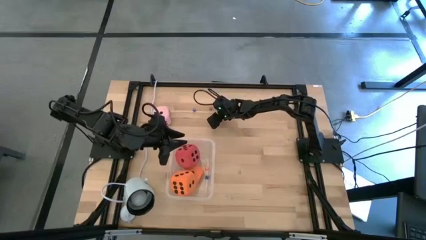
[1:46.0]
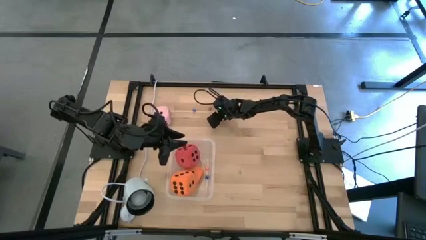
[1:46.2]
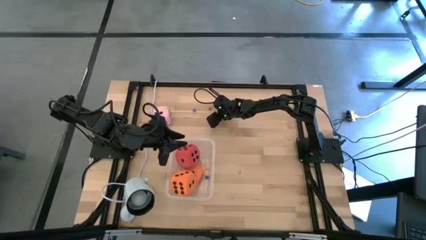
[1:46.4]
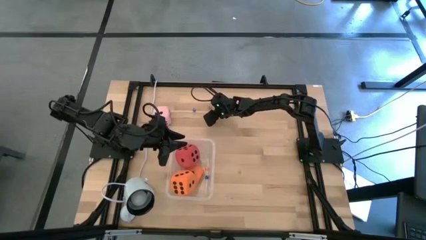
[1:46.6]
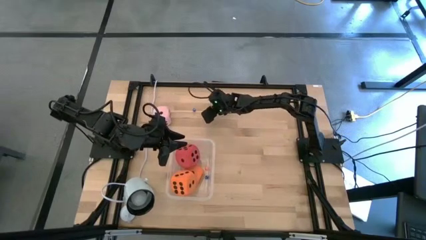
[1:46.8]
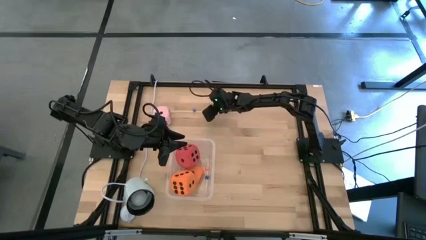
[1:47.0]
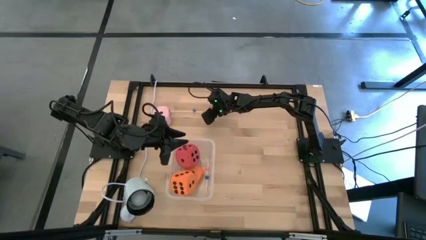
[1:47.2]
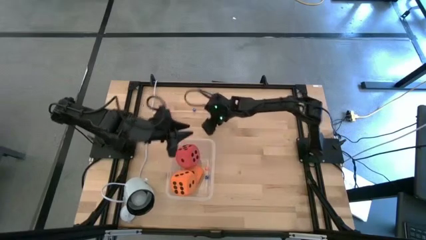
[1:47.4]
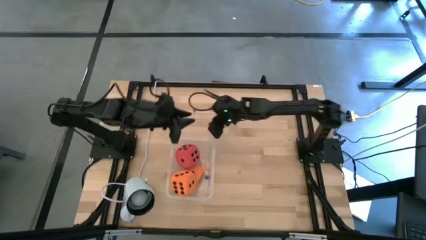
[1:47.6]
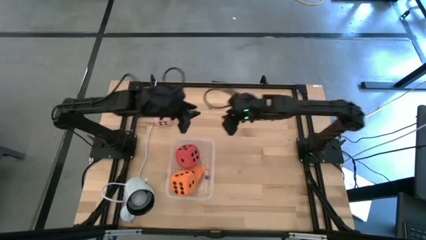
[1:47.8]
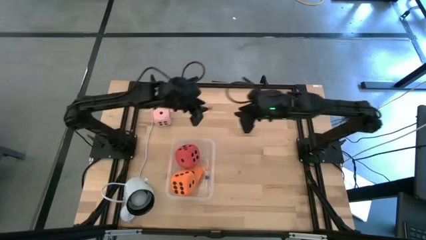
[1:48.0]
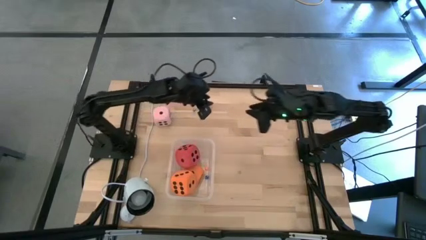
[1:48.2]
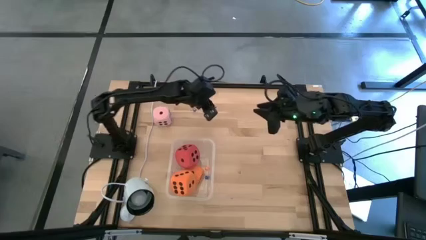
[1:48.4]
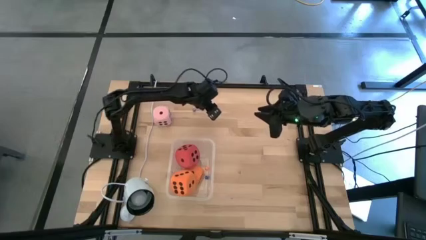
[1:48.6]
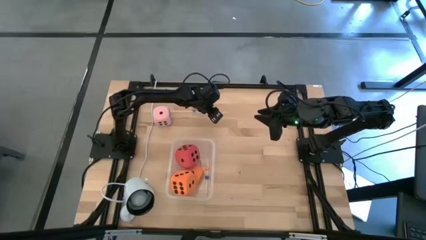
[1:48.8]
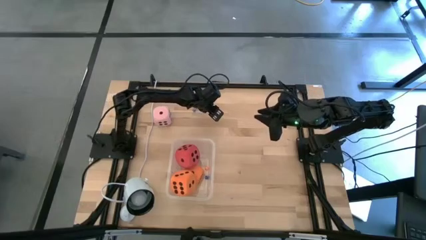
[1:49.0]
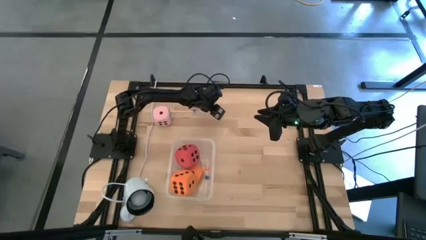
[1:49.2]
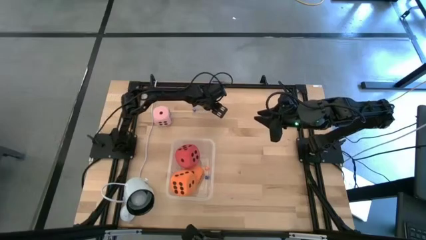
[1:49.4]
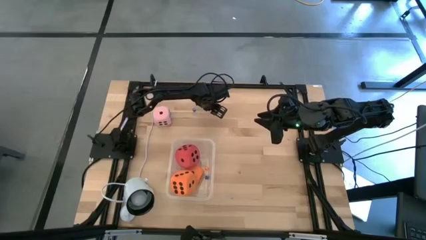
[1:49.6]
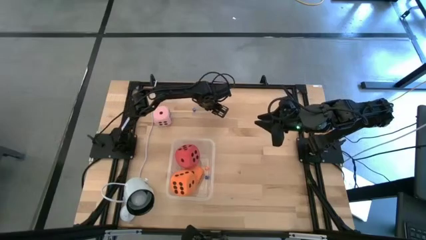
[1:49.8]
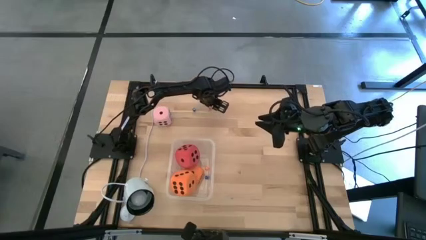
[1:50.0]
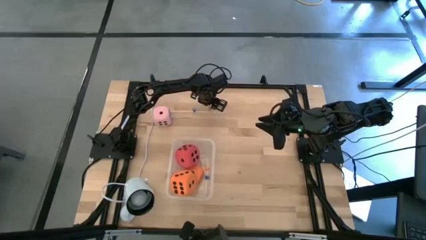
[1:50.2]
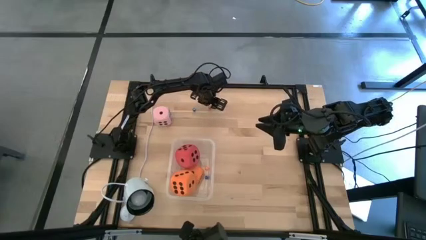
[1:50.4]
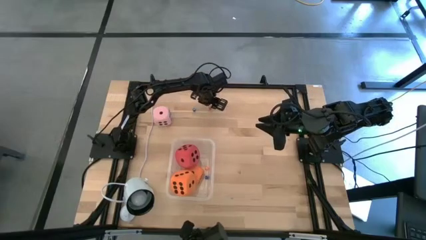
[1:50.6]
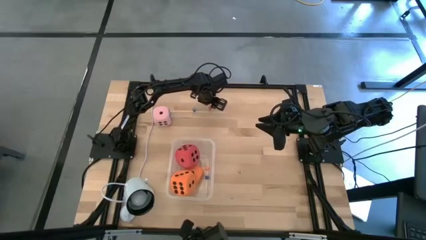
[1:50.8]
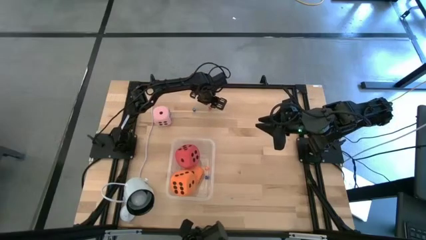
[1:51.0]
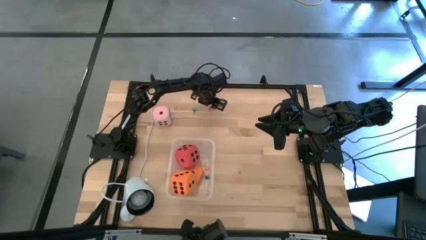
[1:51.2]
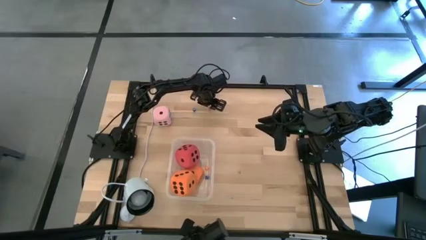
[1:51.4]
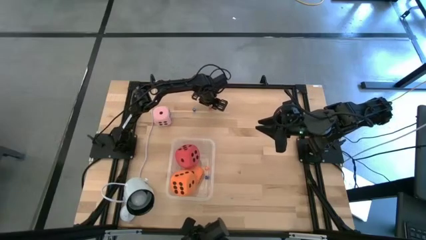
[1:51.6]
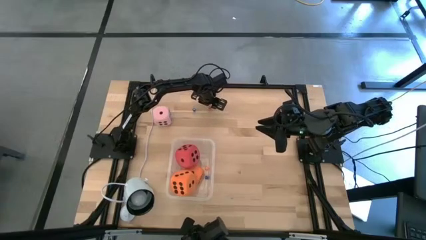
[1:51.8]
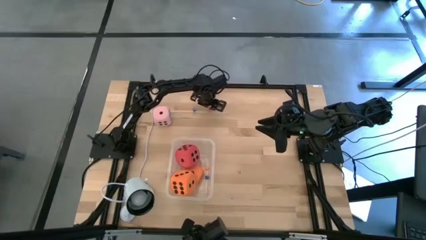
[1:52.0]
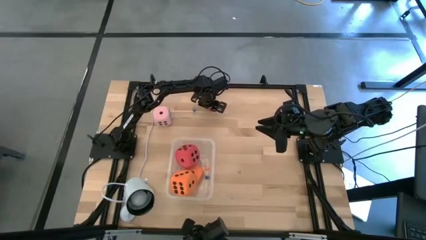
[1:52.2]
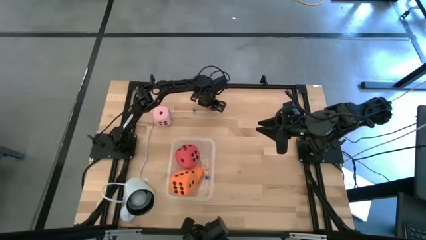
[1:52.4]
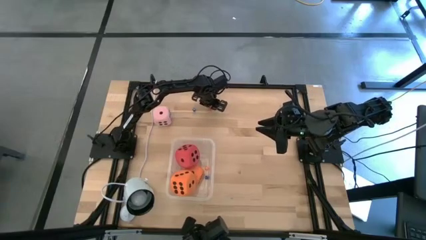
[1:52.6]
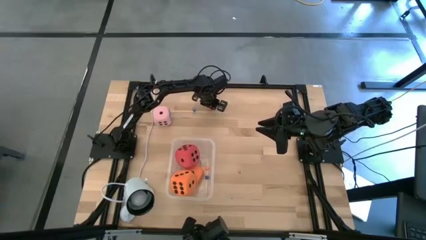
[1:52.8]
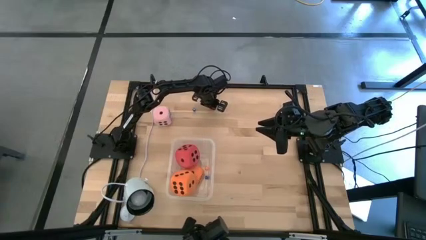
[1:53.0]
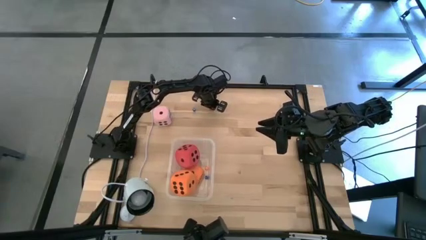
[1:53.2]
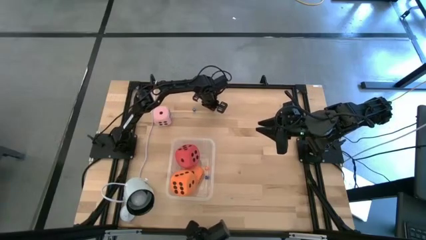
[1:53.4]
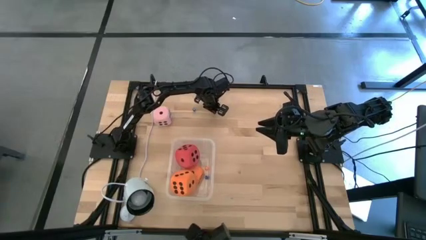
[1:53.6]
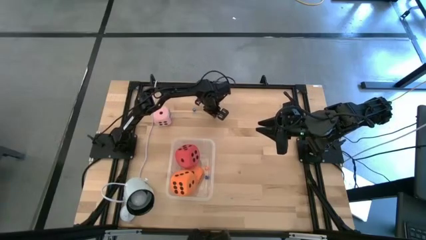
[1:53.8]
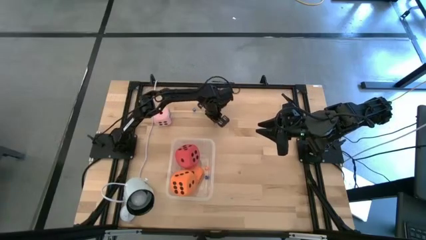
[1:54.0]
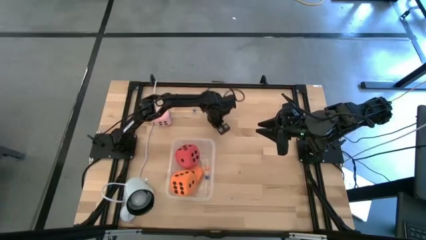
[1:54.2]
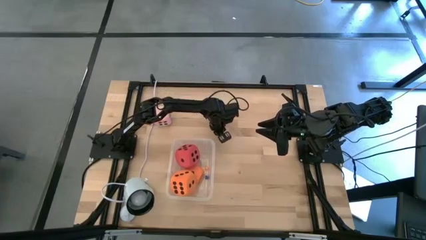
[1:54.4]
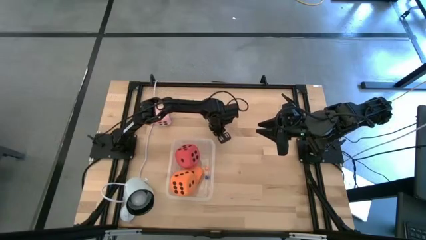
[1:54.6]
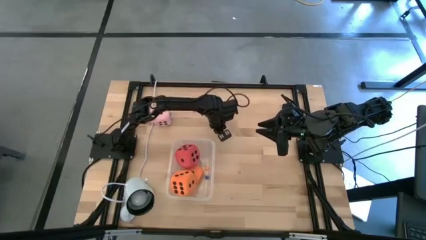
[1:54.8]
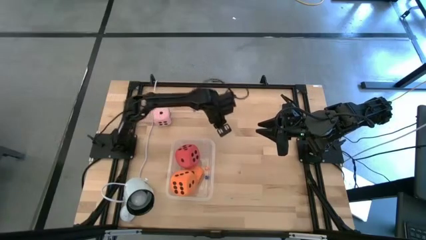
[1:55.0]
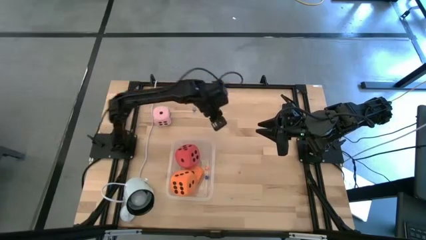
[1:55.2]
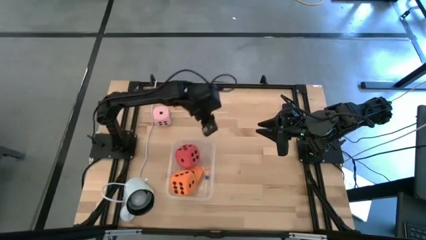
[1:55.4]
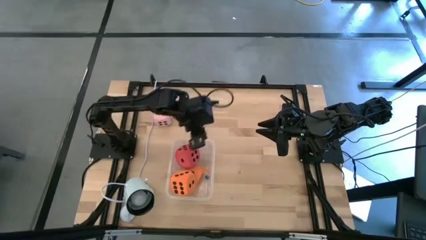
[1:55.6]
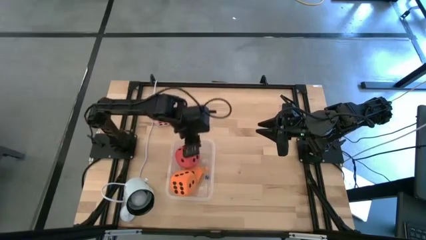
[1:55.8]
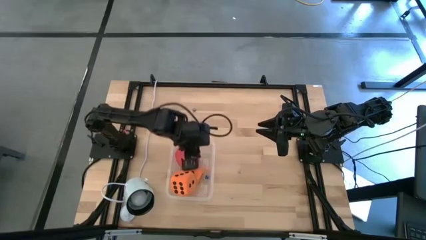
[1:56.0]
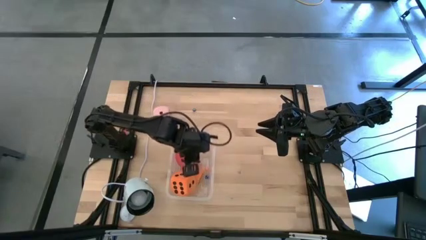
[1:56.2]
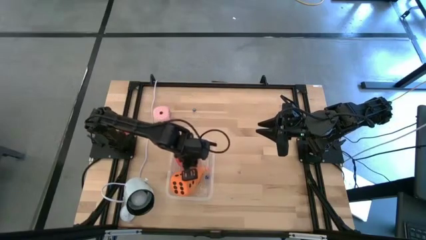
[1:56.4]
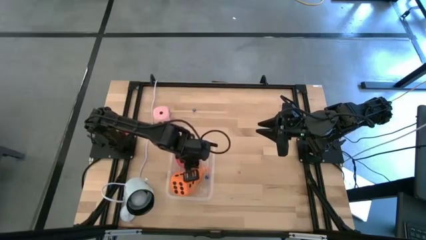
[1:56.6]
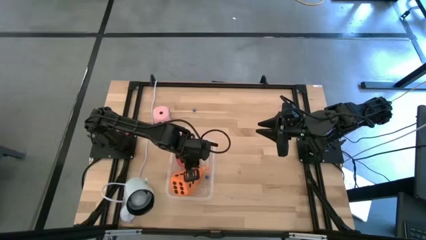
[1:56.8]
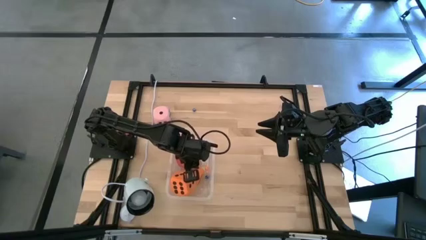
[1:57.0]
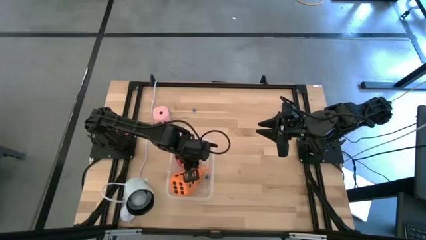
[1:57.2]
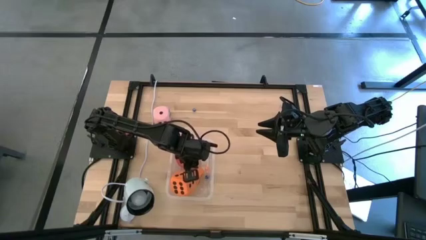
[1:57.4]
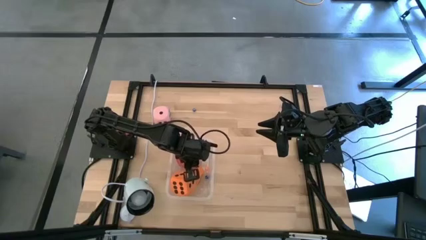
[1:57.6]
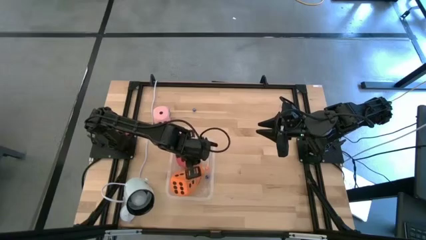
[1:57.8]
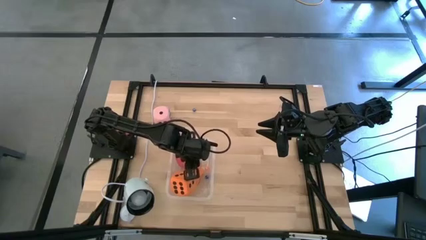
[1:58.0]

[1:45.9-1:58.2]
Task: Pick & Place Dice
Put the small red die on the bin

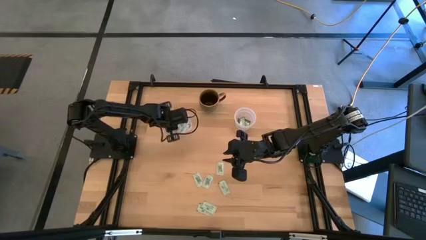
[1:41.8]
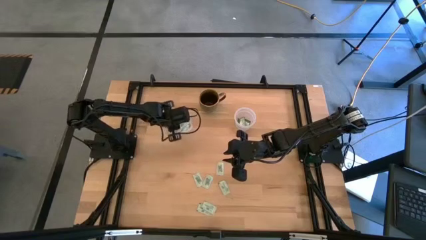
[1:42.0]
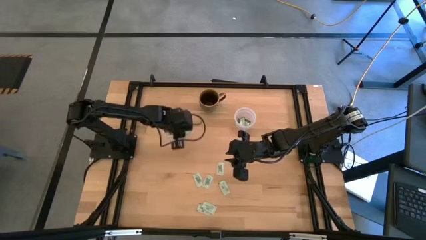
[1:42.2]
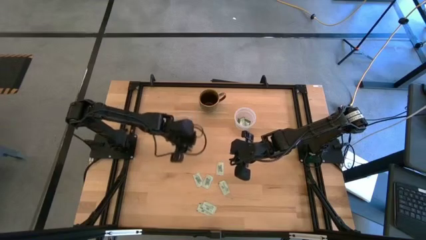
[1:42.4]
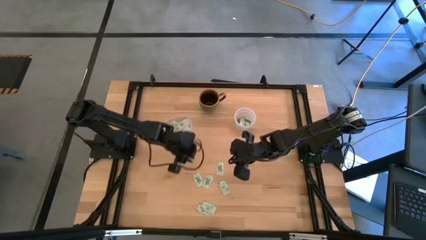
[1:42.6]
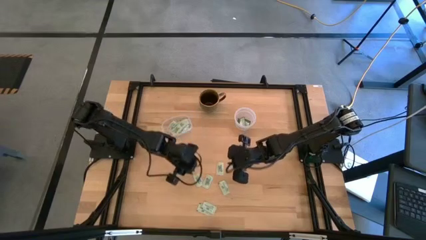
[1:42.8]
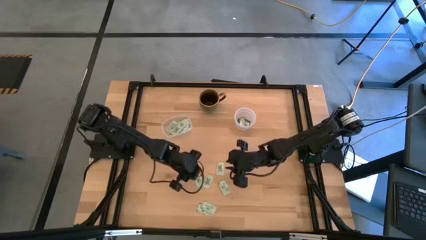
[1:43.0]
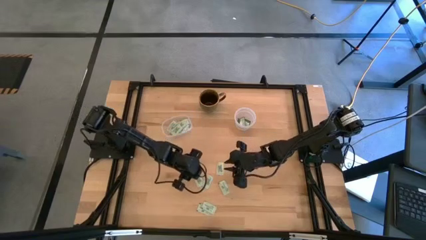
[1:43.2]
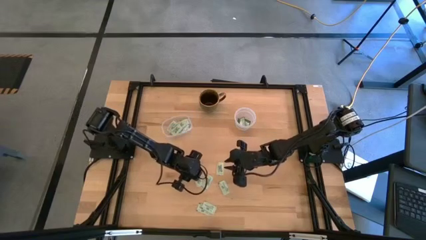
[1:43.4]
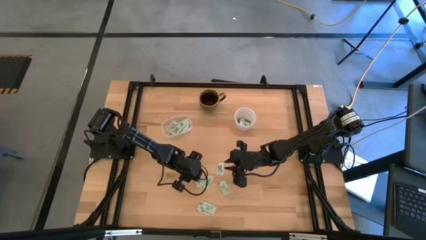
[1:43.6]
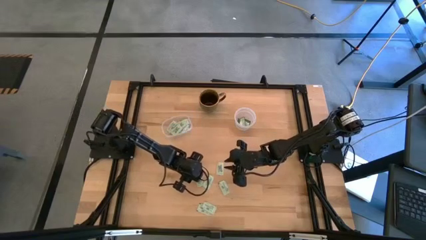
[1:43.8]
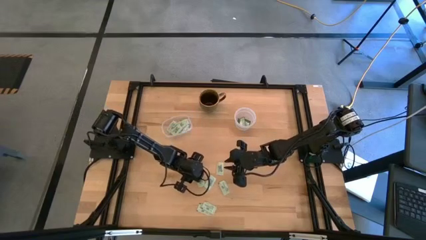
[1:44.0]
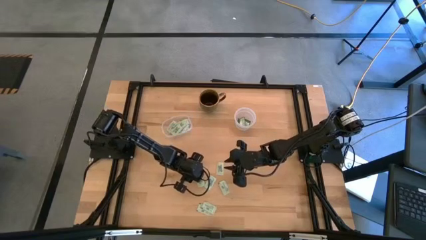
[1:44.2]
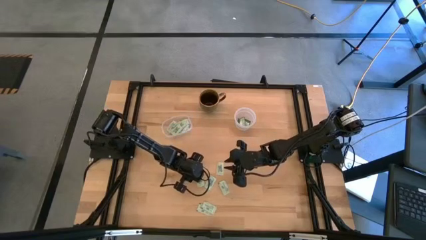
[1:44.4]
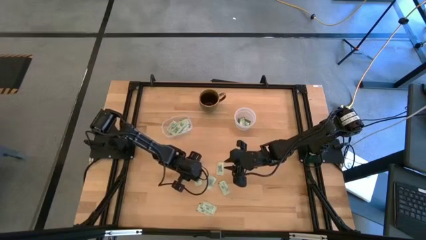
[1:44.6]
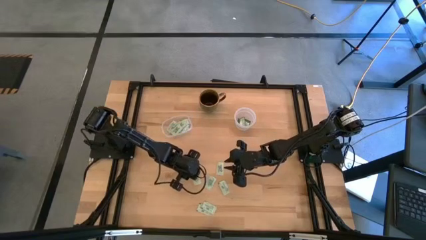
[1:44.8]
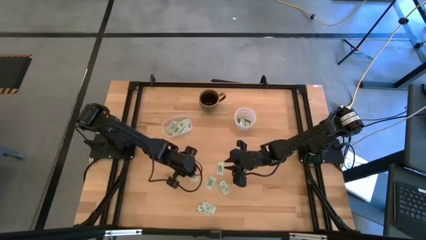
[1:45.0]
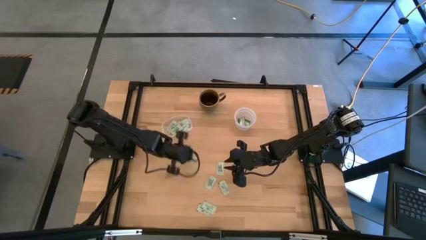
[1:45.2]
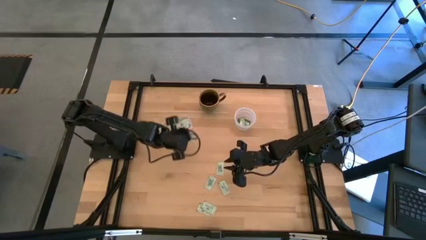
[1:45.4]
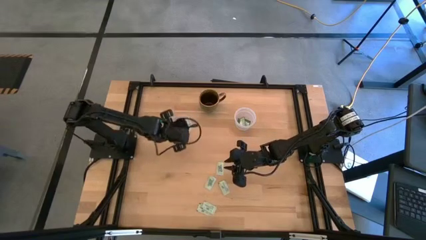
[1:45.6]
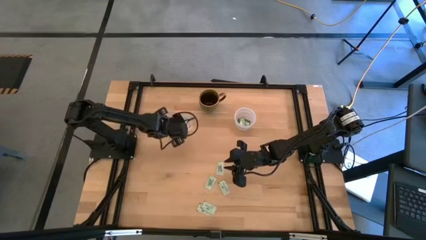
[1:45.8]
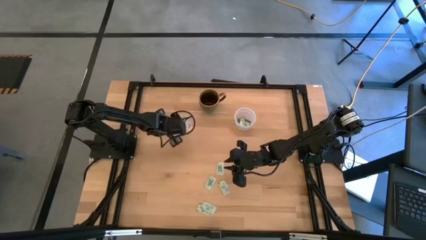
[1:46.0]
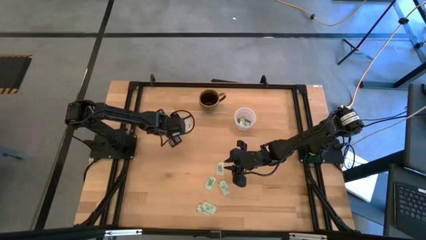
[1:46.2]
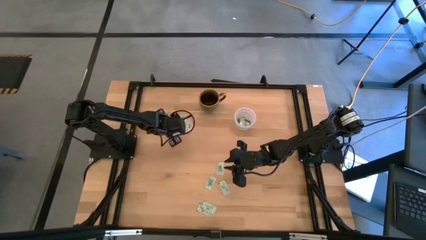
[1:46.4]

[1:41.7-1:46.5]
Task: Pick and place Stevia / Truvia into bins
Put the light green stevia packet into the left transparent container
